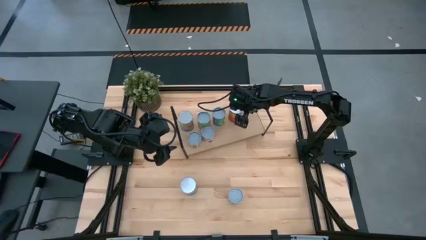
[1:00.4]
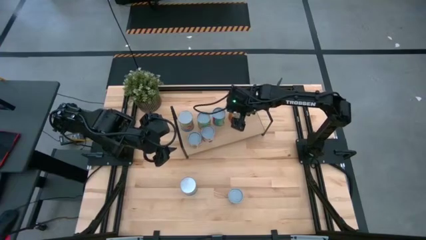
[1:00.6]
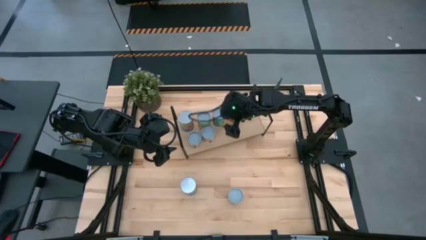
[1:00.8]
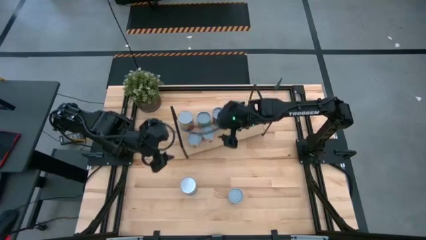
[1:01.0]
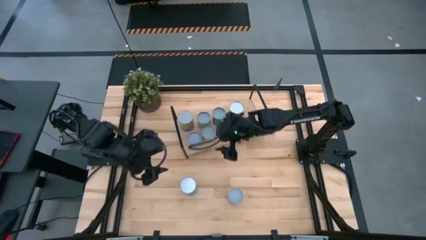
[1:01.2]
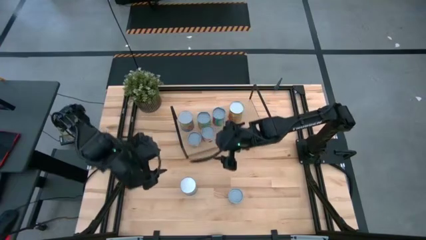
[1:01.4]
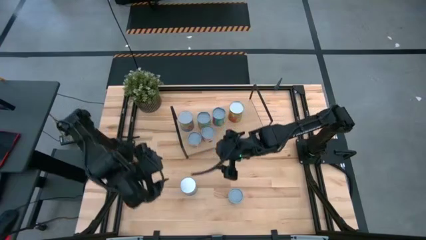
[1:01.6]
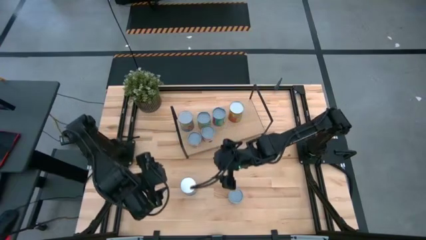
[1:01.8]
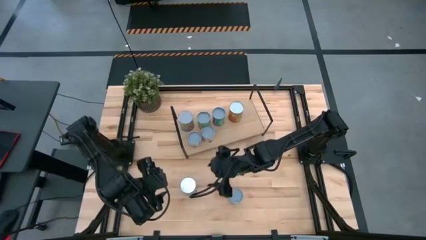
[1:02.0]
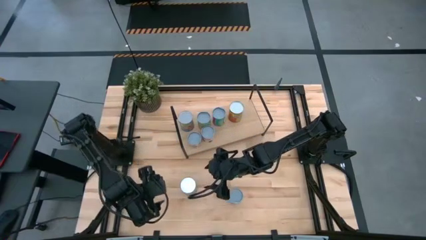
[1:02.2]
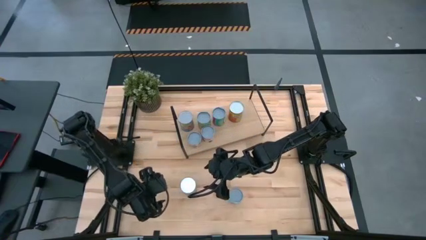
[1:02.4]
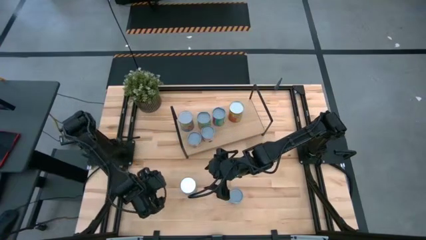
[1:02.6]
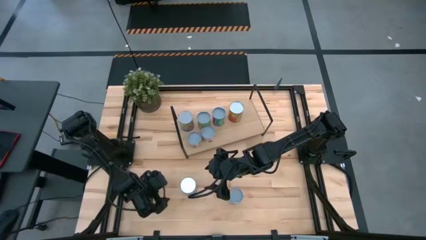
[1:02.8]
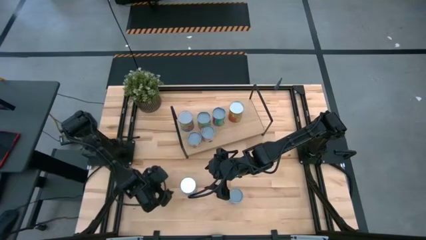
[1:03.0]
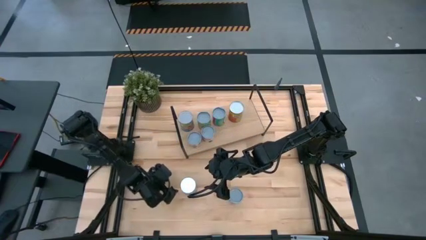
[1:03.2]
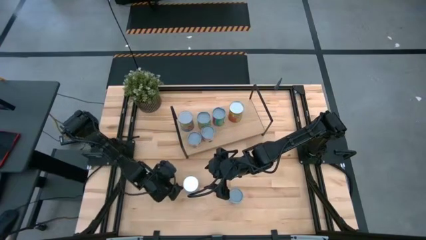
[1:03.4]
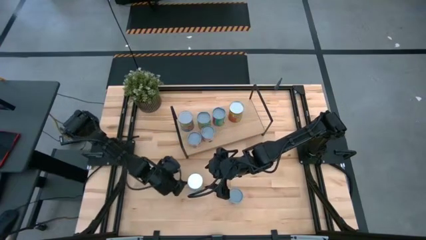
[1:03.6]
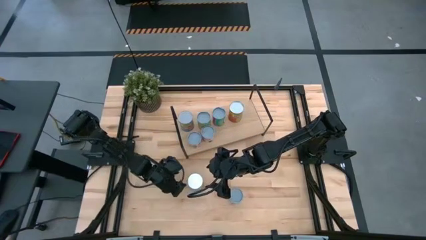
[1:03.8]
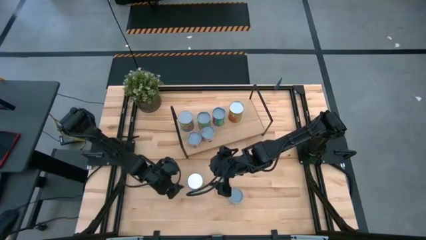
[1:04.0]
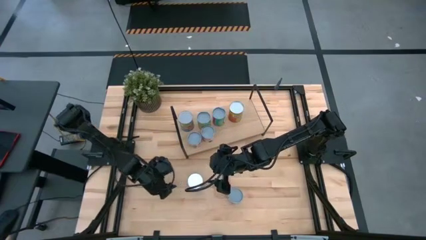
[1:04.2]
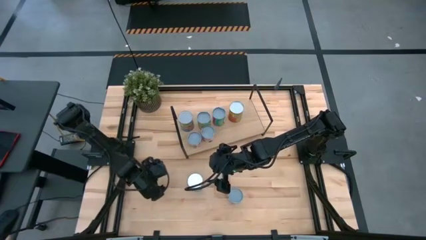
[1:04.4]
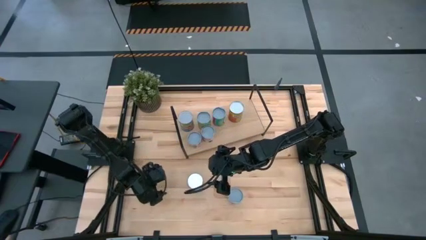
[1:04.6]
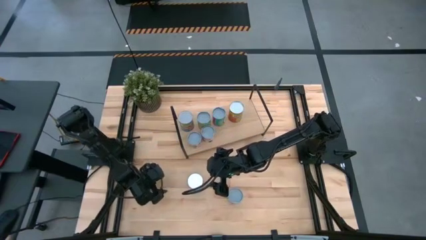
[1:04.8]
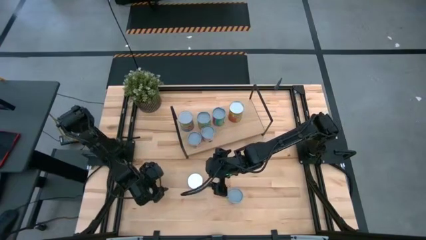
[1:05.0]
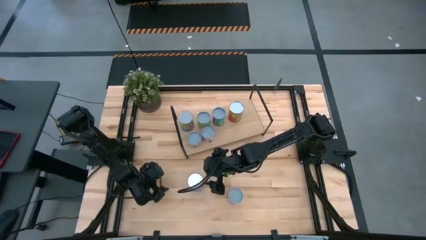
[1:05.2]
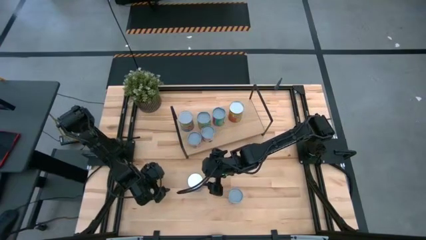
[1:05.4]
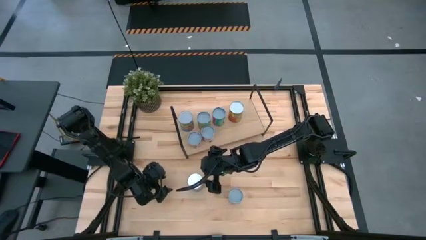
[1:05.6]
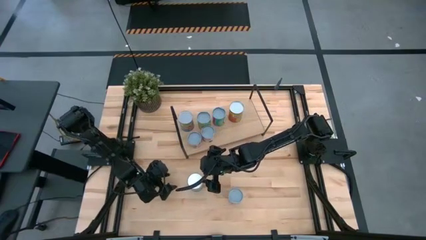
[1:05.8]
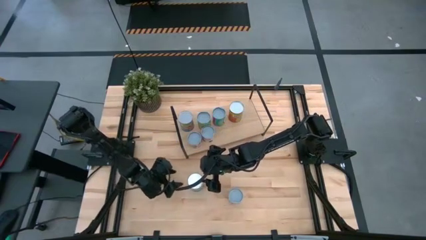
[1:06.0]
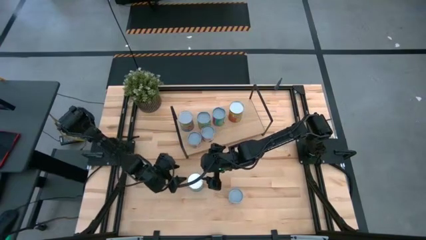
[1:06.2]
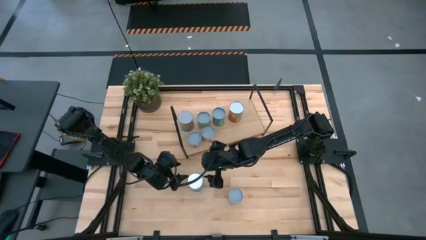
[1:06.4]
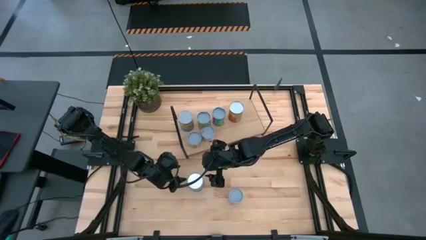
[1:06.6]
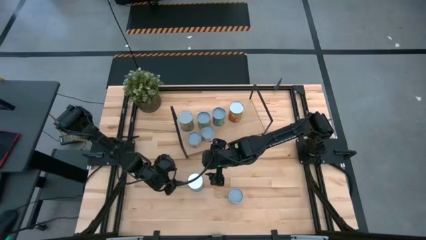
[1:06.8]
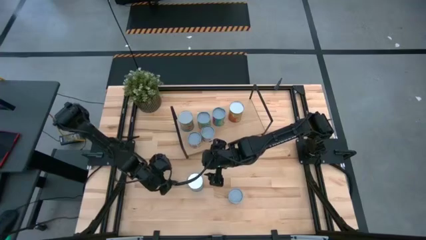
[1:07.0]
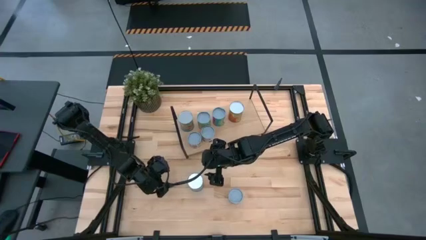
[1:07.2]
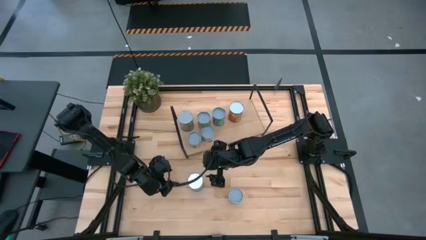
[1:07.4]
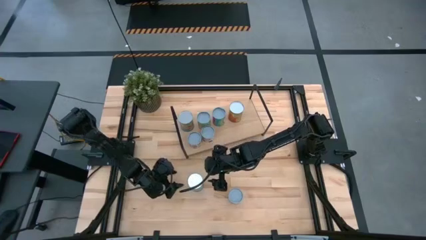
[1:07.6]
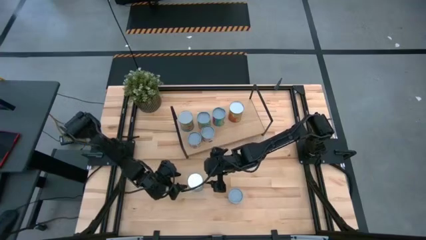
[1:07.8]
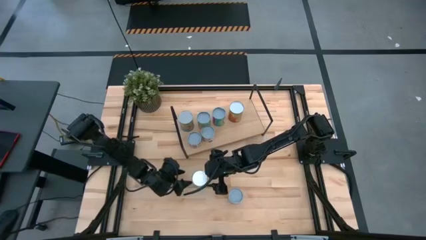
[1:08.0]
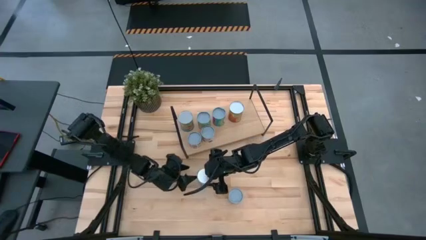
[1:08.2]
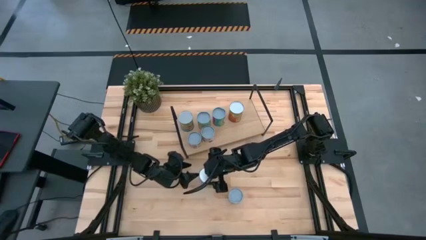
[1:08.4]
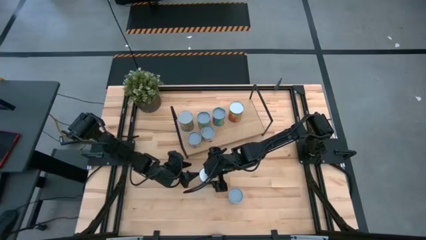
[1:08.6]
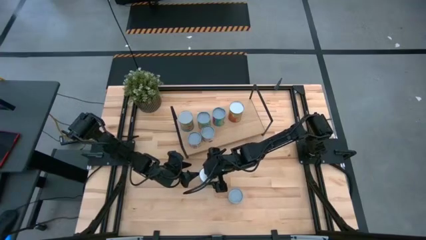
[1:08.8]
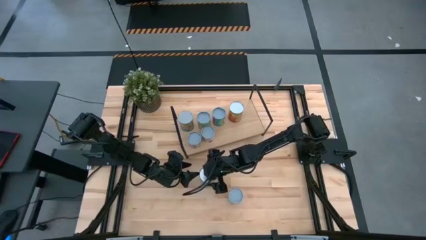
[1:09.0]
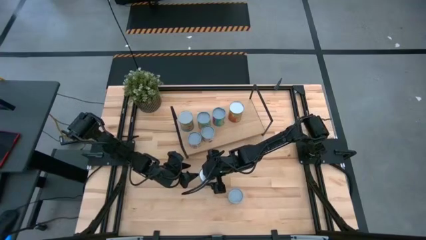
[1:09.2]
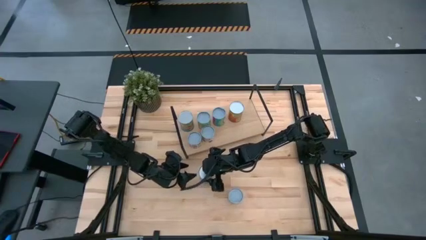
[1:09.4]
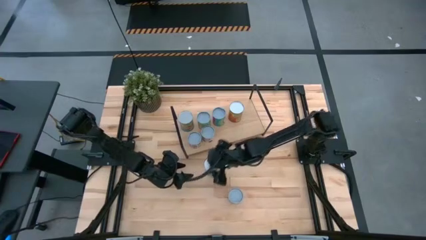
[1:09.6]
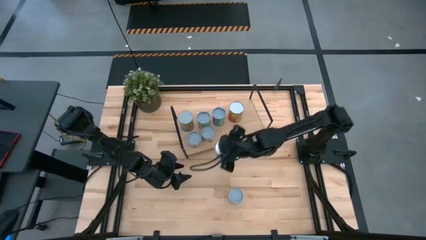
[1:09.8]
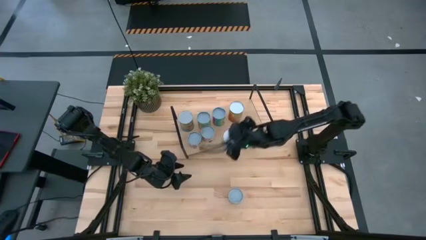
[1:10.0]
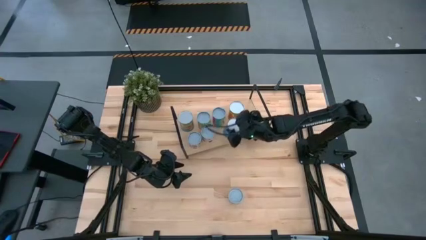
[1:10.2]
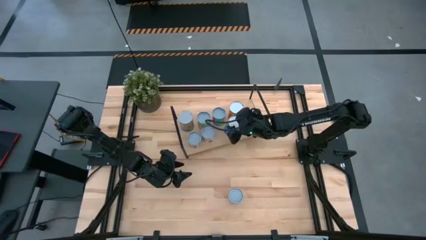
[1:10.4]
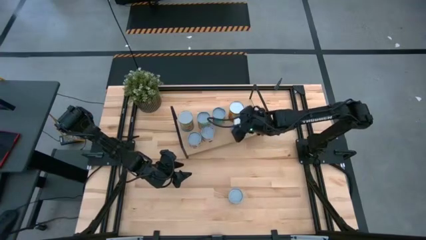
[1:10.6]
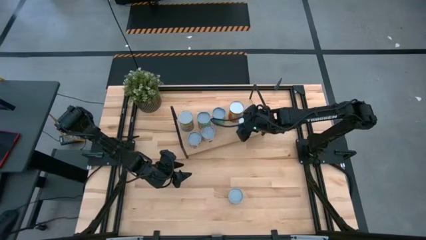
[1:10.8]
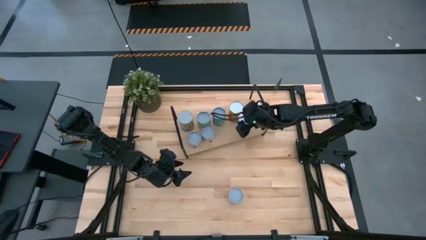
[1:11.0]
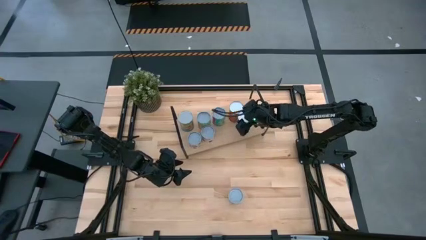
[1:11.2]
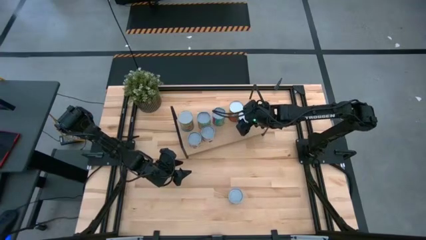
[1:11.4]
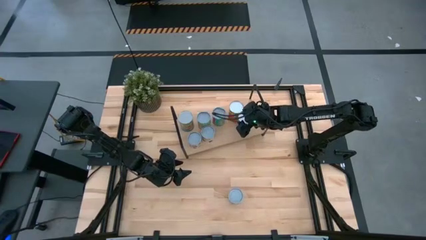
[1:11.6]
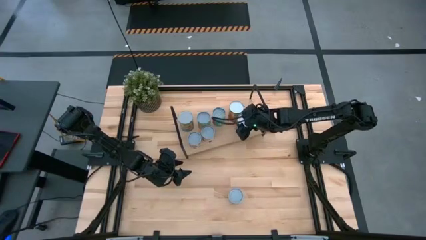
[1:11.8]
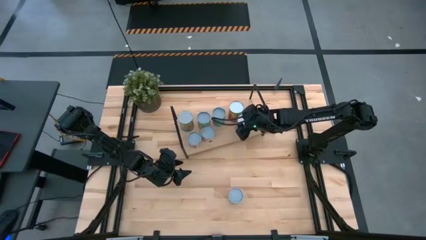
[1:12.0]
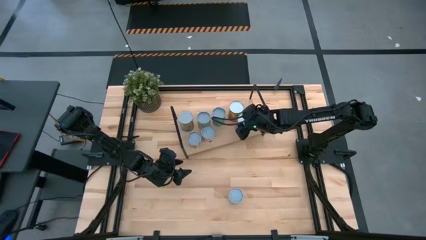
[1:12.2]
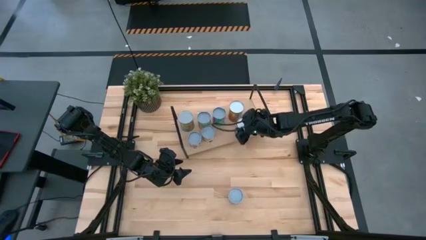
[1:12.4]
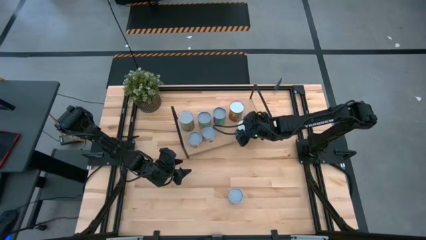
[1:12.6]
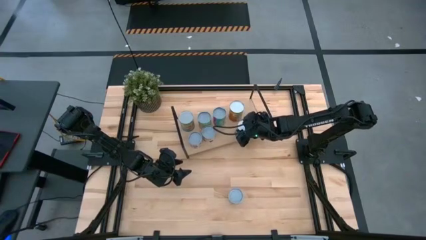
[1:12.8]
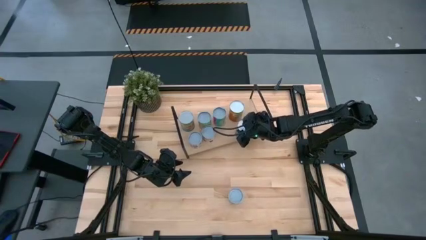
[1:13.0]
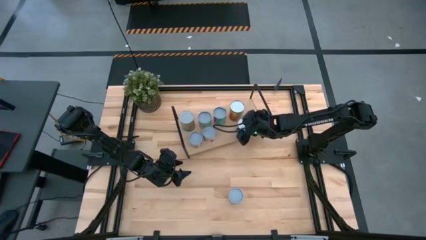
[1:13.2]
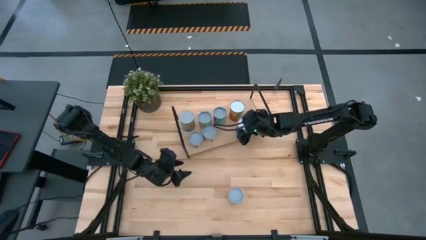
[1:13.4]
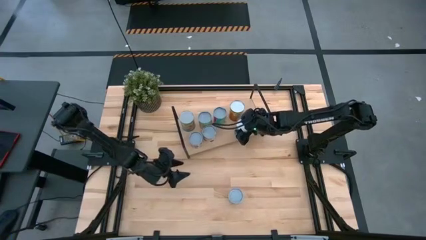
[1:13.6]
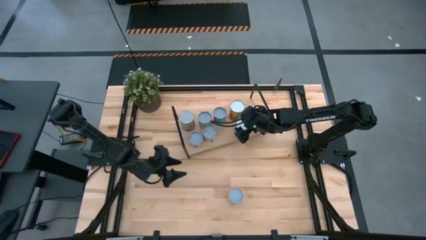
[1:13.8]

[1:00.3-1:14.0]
Task: Pick and place cans onto a shelf
Put the canned cherries on the shelf
